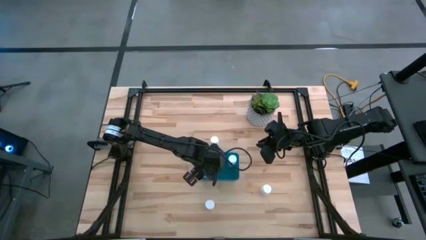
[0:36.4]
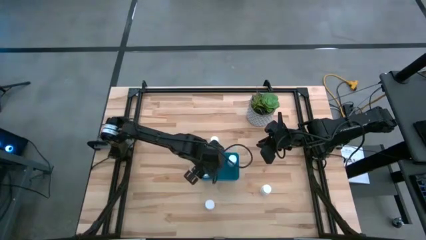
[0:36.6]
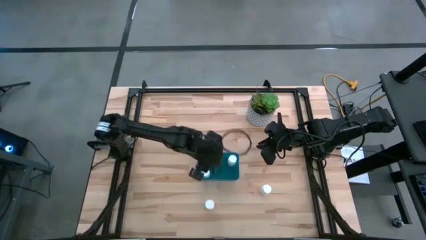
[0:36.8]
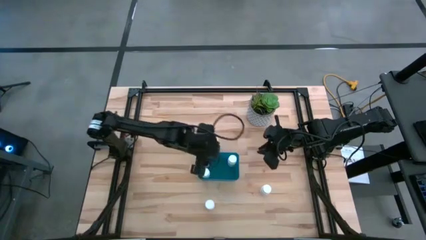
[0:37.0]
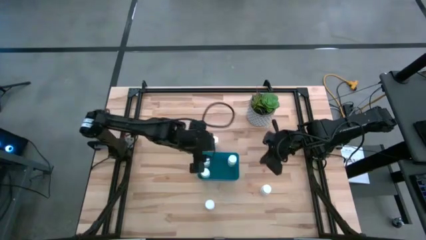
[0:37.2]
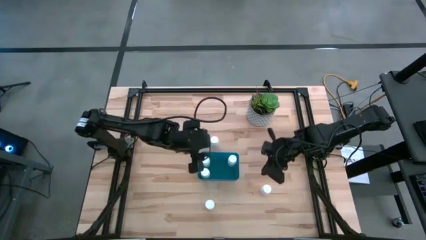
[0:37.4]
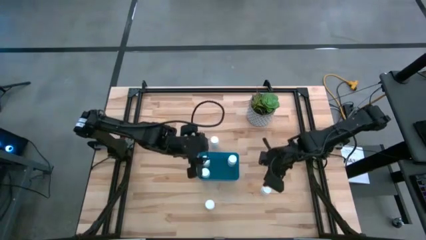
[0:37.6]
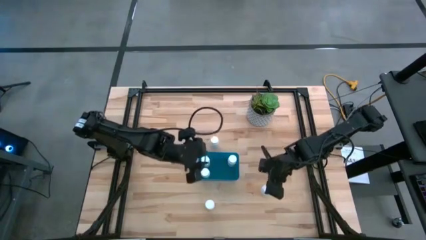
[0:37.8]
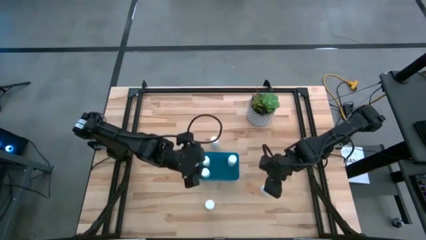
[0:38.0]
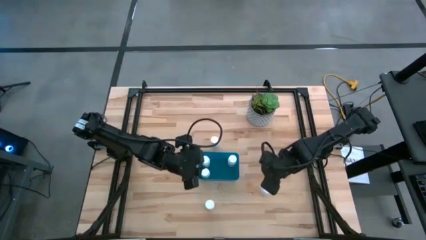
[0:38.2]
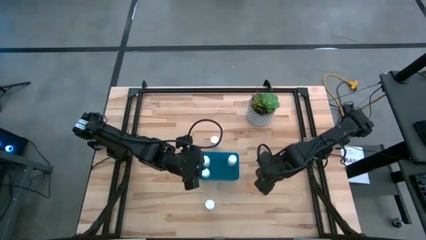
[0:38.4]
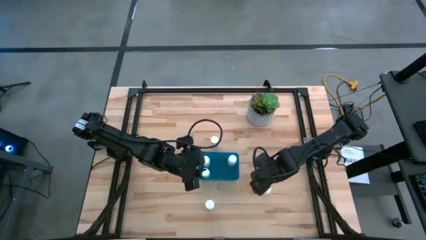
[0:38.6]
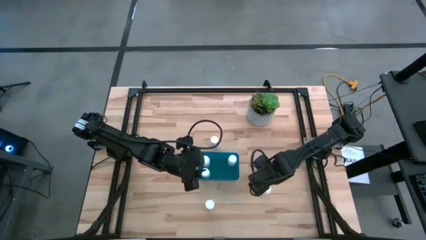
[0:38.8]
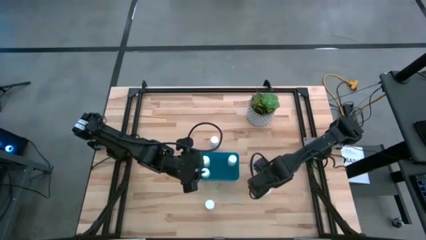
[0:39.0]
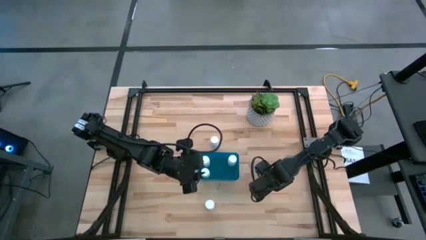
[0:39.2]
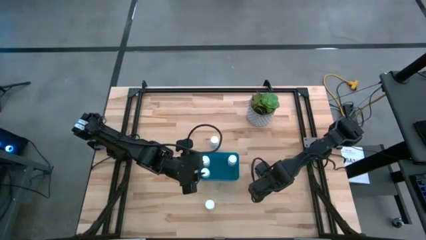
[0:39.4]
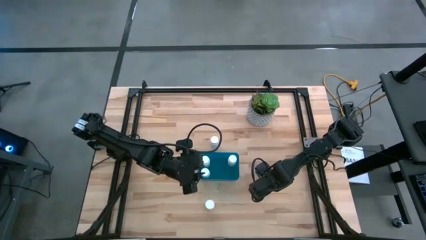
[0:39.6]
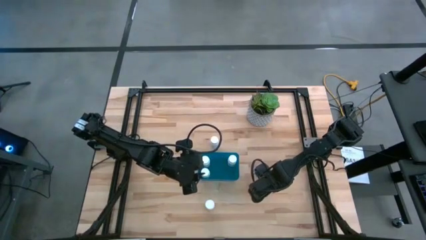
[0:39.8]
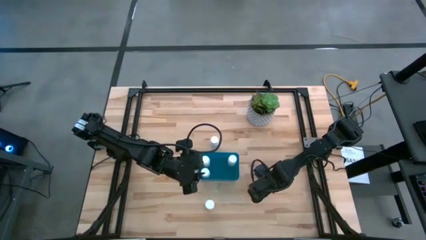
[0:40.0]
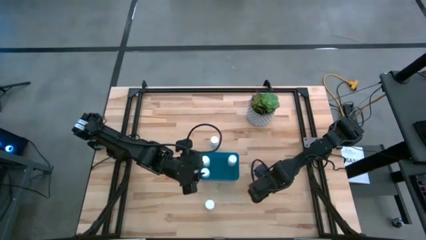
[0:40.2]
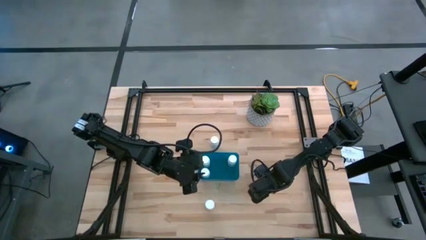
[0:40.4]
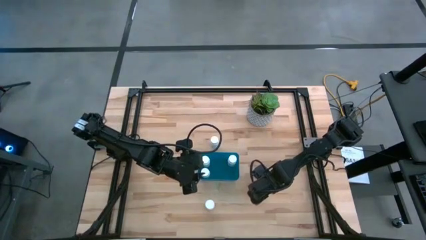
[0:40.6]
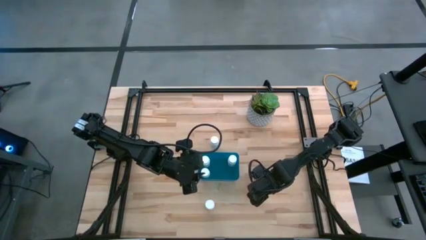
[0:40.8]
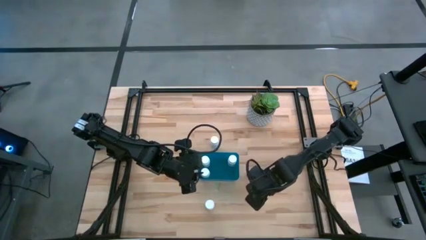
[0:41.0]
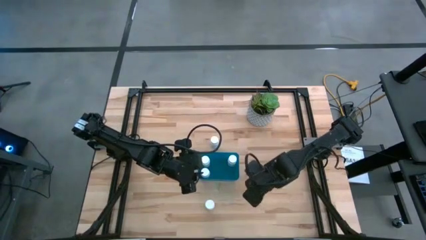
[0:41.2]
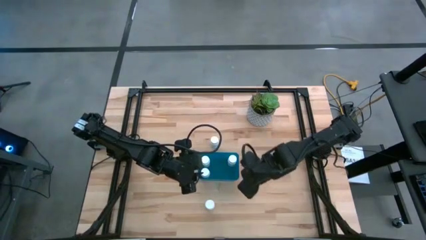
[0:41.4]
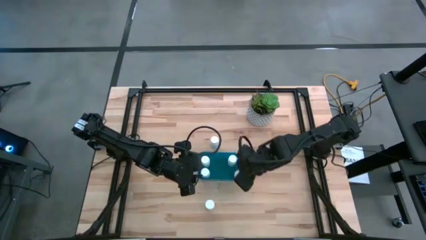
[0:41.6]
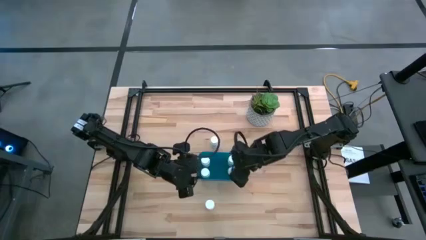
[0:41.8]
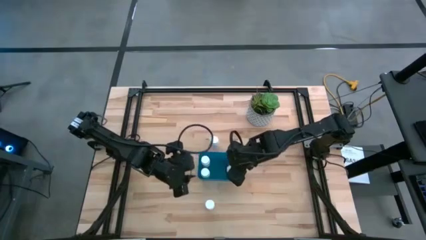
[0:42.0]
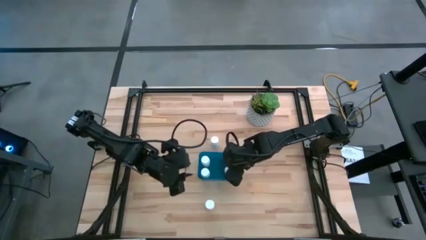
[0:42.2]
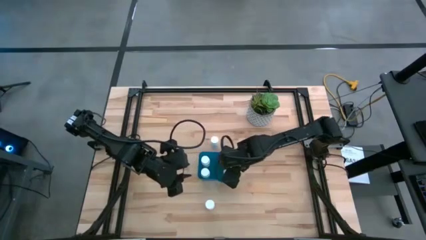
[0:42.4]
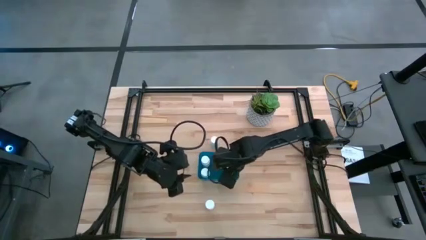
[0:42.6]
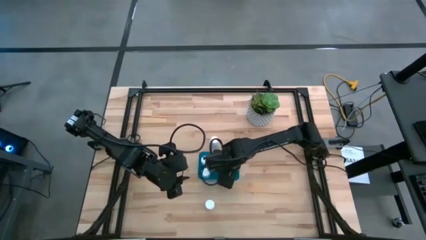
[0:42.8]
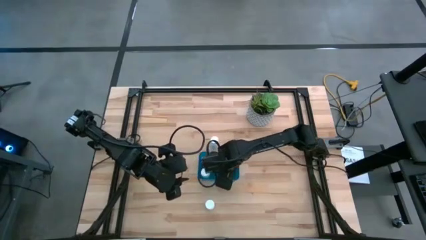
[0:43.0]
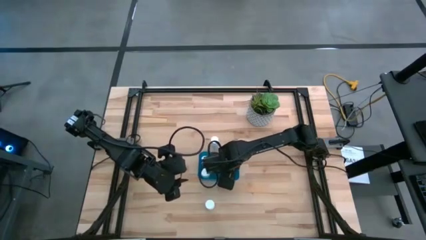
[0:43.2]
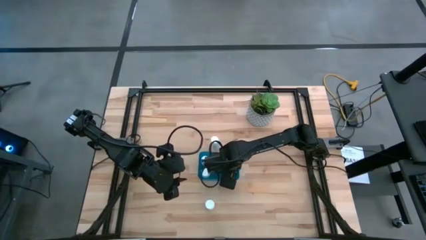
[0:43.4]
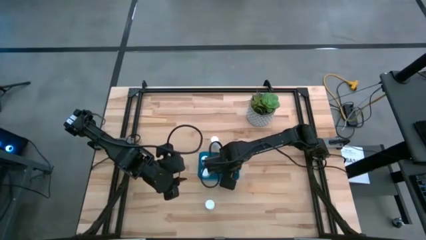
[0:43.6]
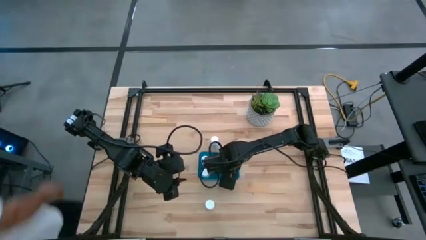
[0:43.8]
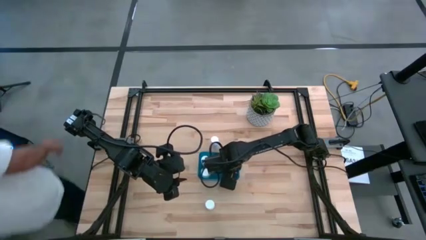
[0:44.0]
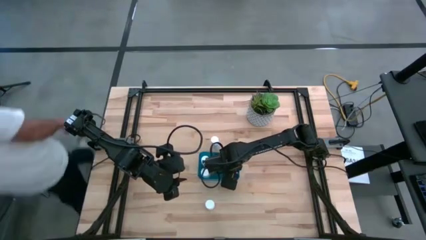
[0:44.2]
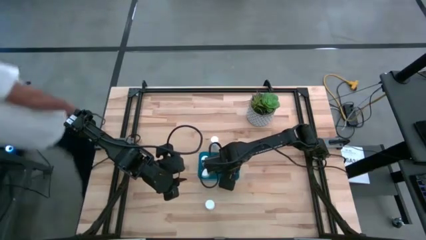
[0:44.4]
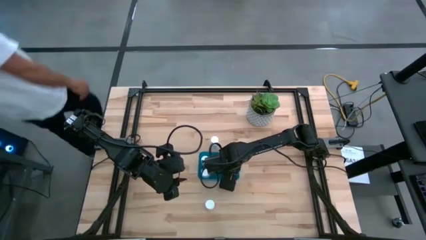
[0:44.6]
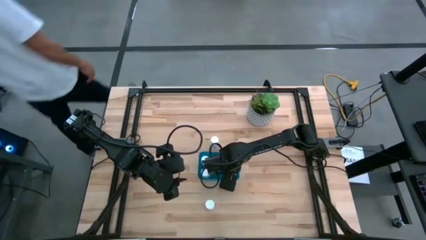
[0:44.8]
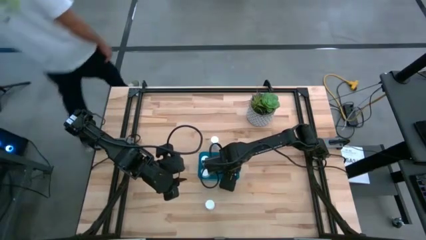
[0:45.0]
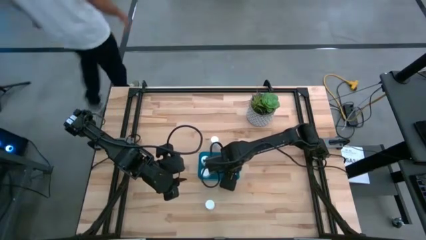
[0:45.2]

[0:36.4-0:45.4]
Task: Pick and place pill bottles into a basket
Put the white pill bottle into the blue bin

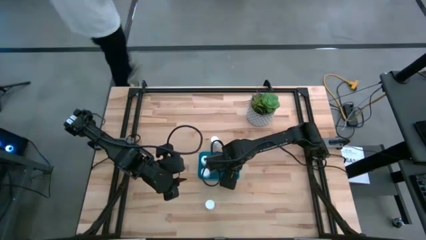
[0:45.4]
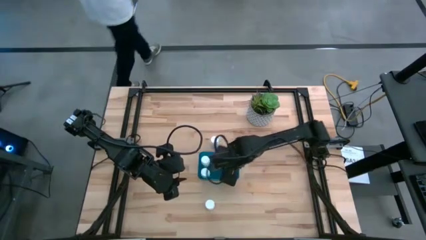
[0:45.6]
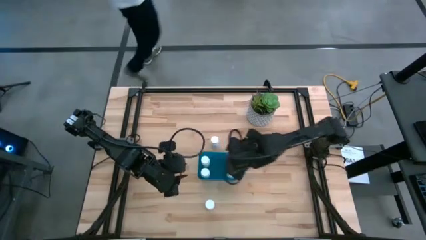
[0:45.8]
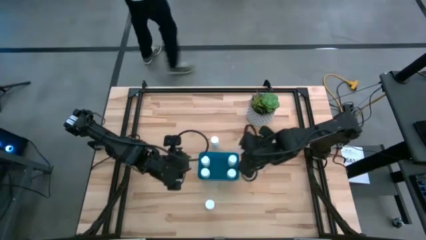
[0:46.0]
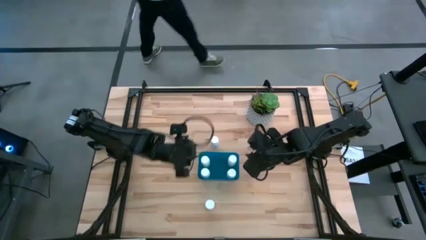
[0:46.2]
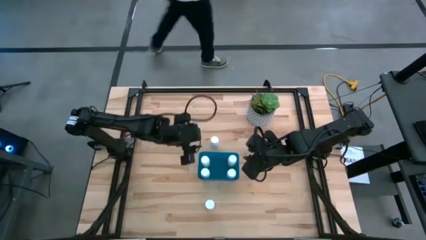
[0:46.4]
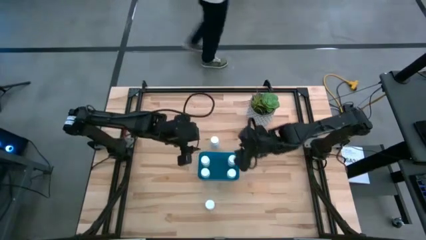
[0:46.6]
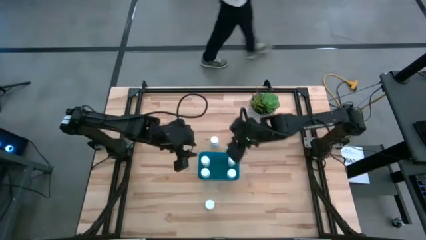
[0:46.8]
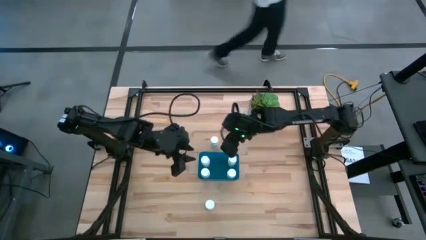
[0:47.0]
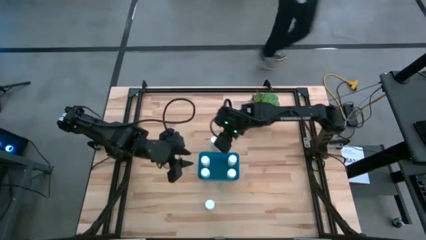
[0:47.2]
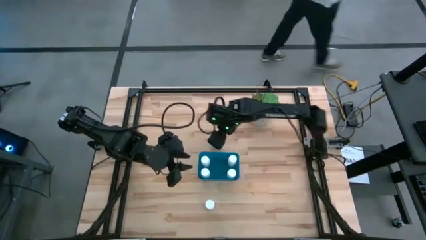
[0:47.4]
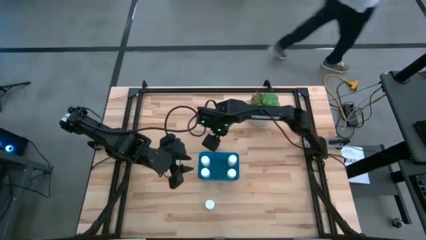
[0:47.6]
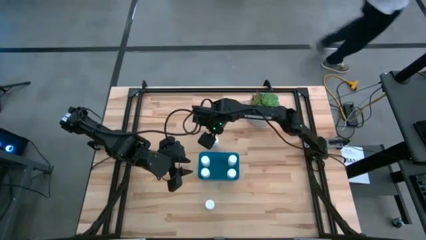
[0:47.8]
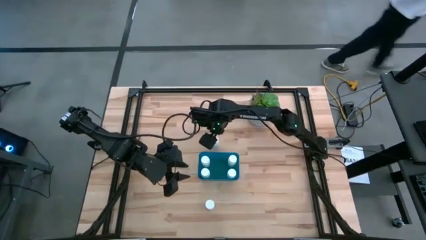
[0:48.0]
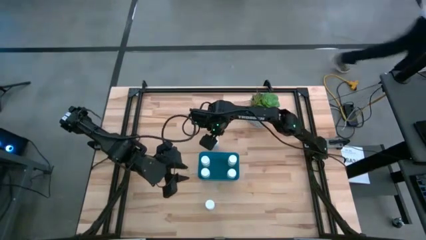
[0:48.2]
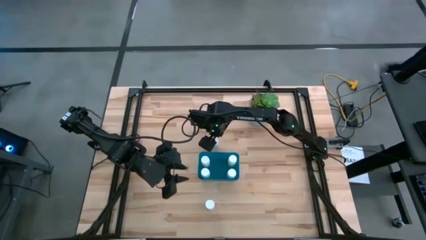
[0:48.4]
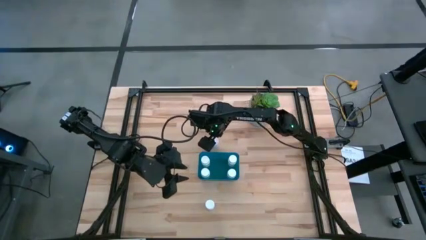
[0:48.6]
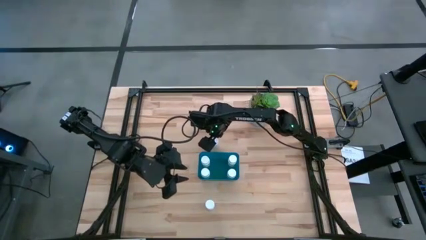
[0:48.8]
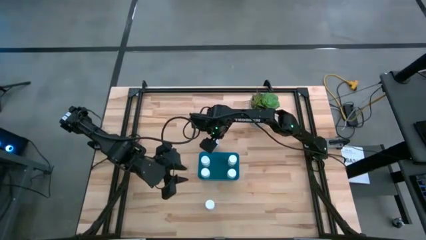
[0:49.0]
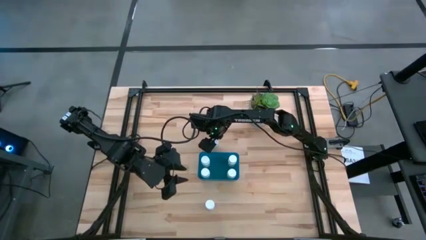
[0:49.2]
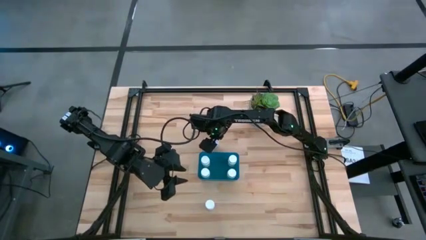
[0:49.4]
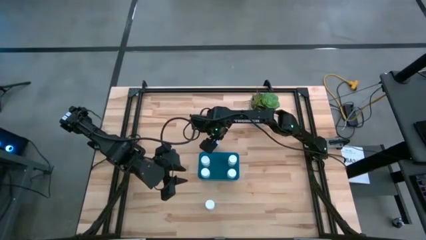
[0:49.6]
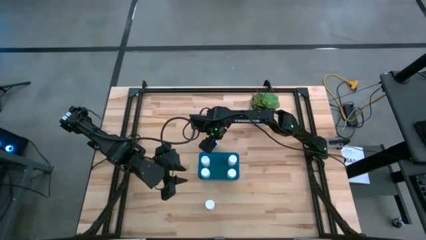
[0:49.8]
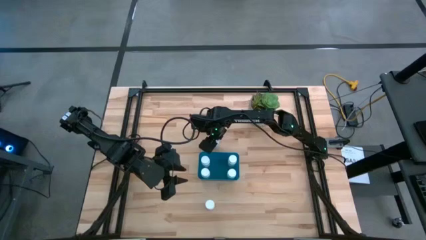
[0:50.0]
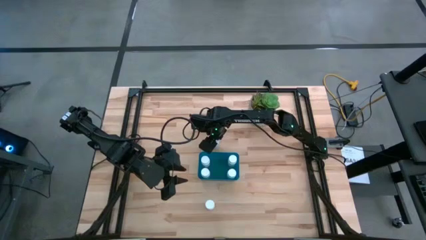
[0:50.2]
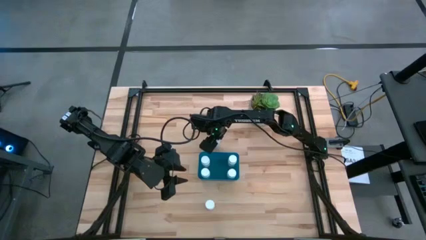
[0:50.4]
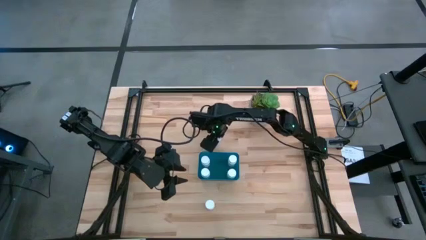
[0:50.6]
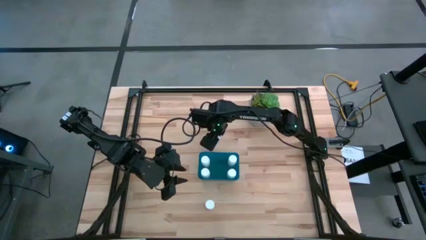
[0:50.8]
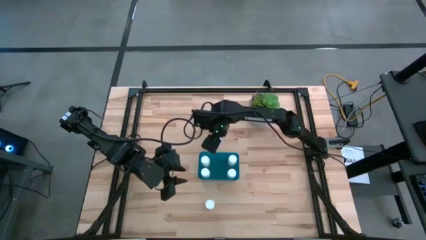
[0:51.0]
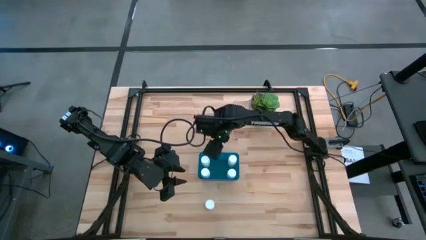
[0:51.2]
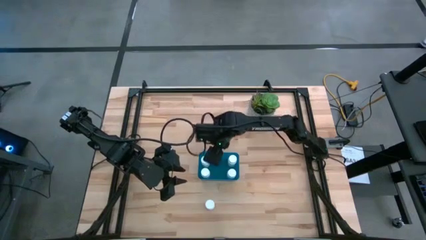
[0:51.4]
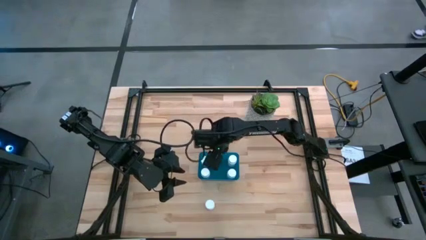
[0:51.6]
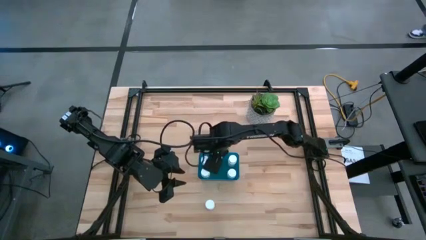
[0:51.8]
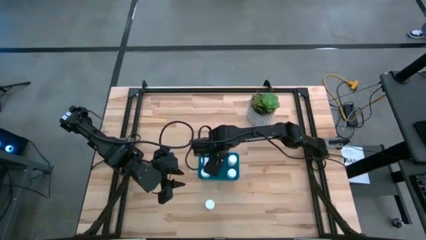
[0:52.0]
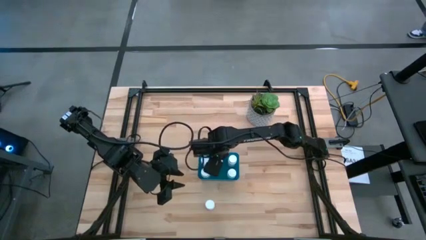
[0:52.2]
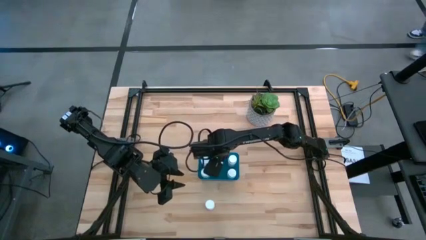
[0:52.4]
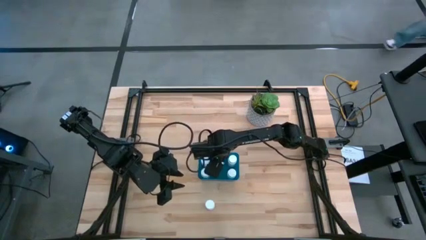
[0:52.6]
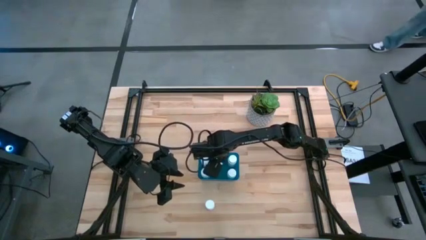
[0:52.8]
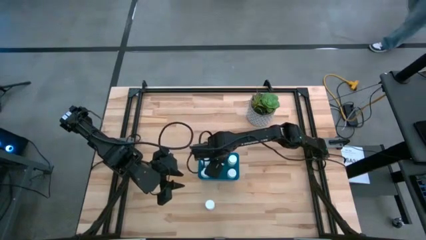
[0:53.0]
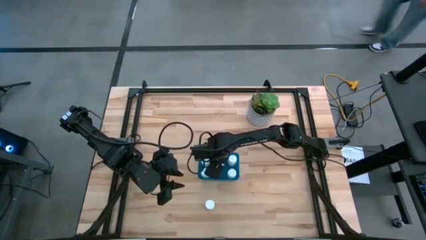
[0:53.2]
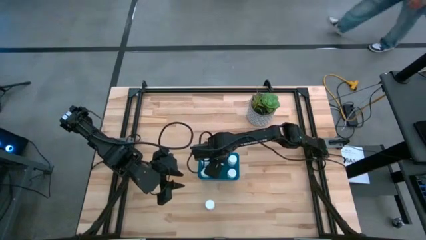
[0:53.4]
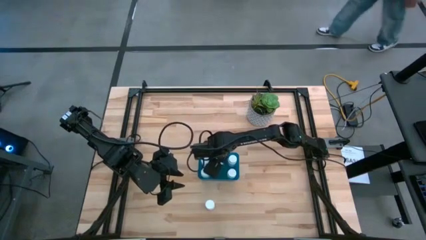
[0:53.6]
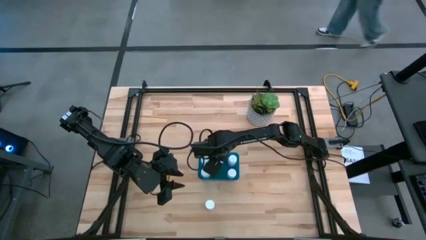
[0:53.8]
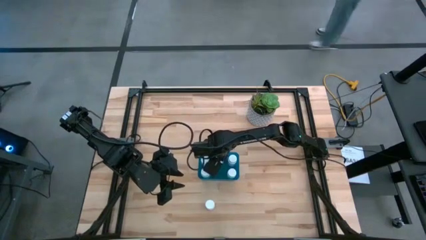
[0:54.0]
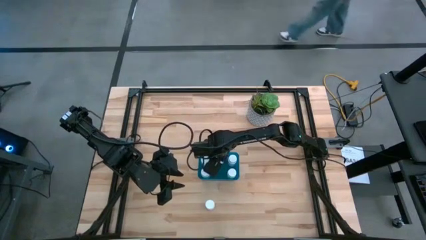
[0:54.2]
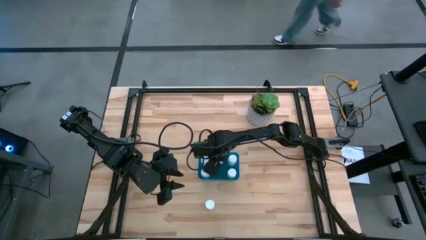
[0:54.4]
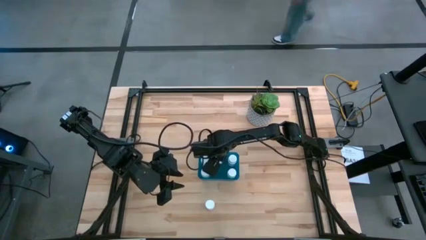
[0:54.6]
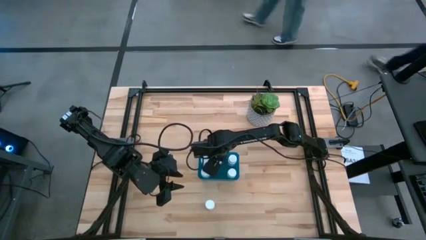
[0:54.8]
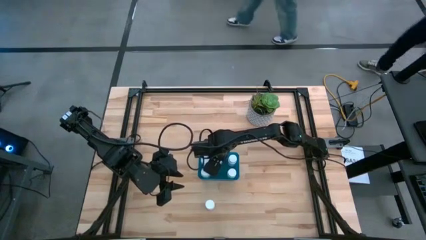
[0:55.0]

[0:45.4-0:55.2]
Put the white pill bottle into the blue bin
